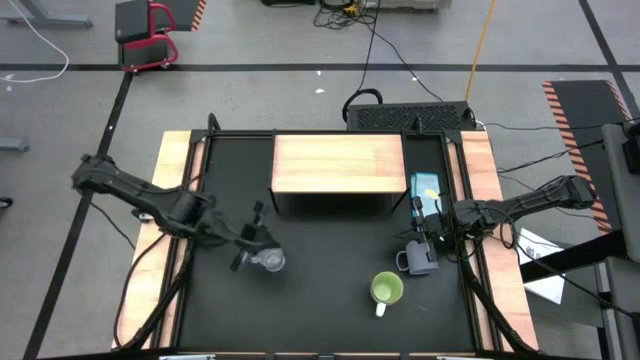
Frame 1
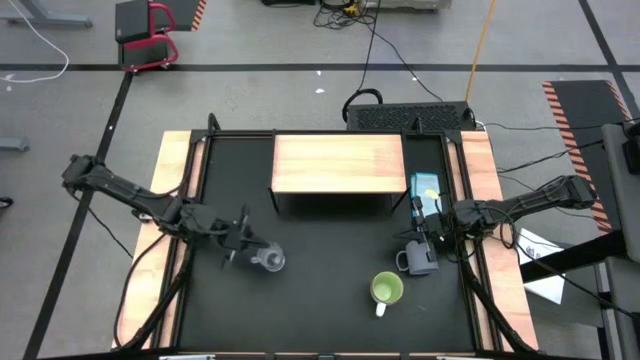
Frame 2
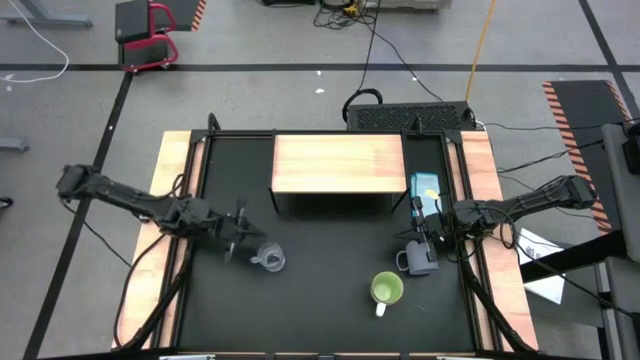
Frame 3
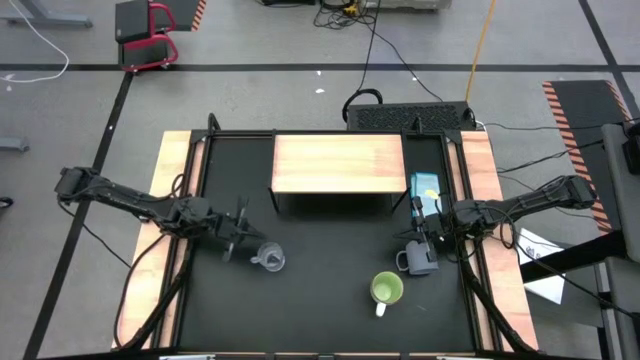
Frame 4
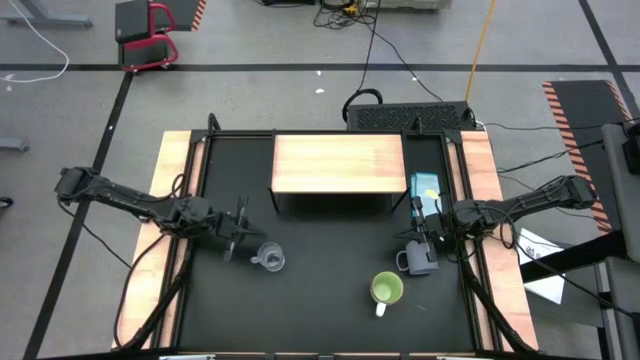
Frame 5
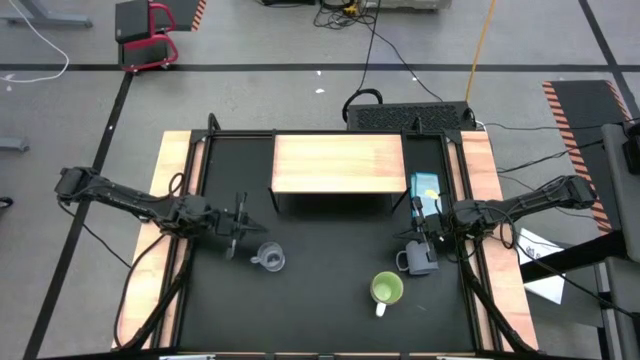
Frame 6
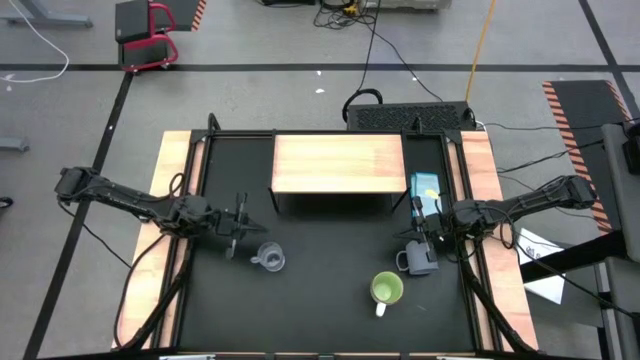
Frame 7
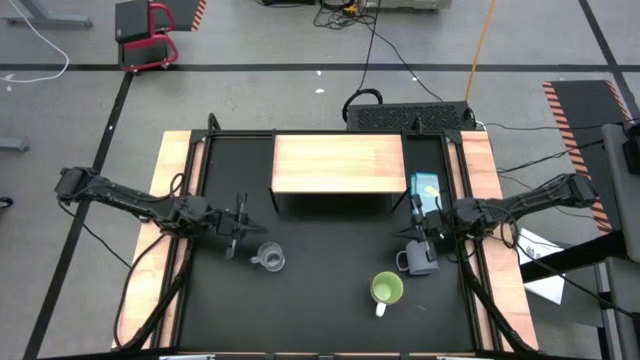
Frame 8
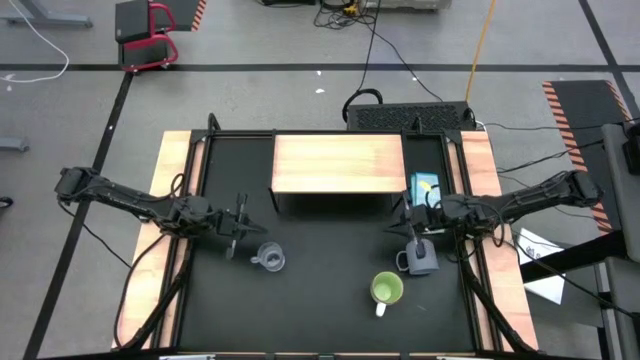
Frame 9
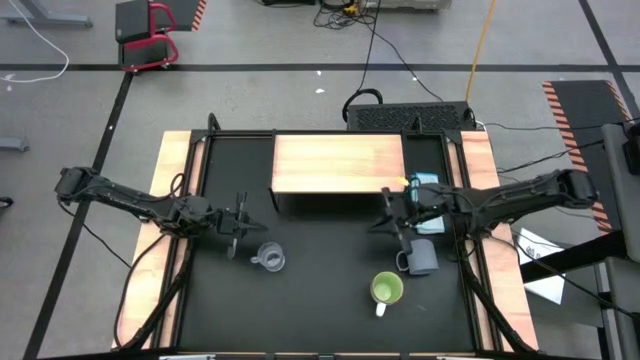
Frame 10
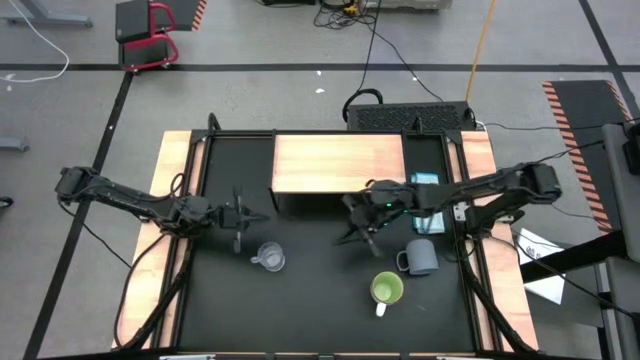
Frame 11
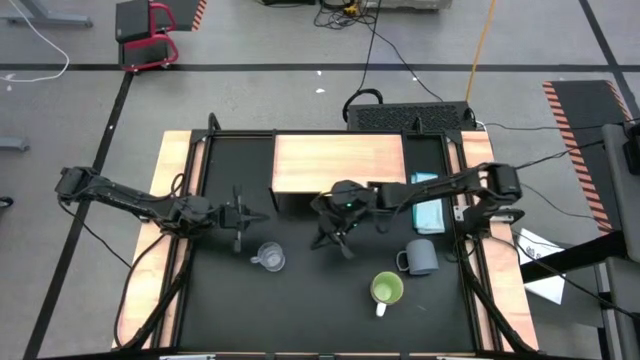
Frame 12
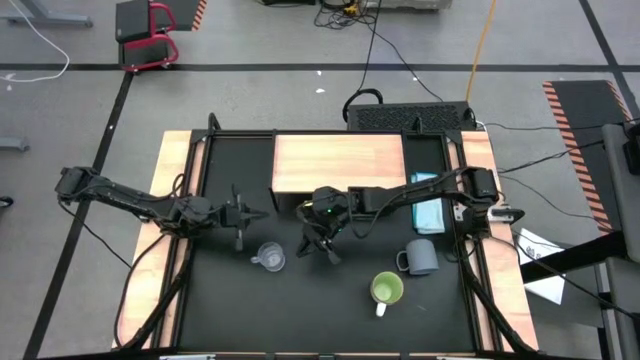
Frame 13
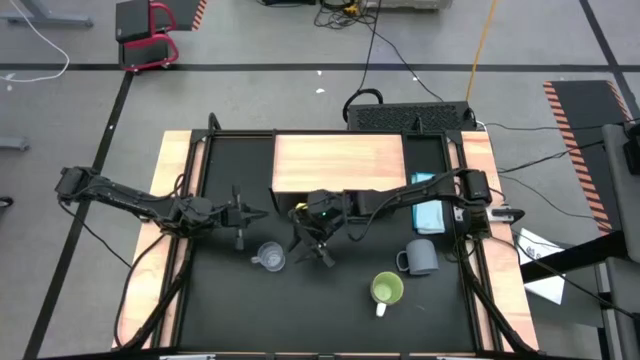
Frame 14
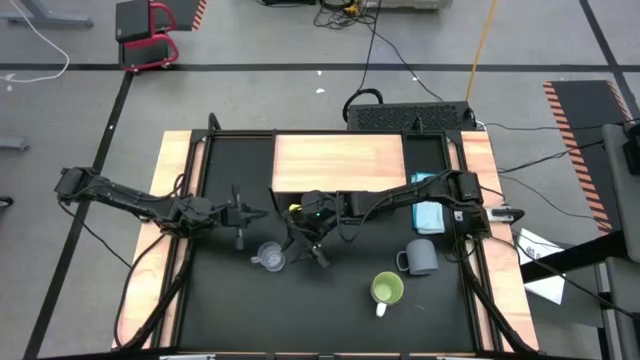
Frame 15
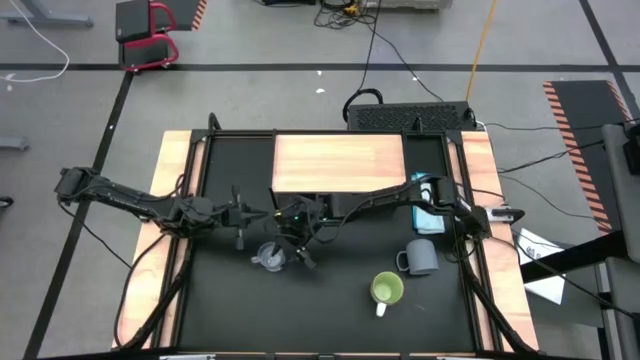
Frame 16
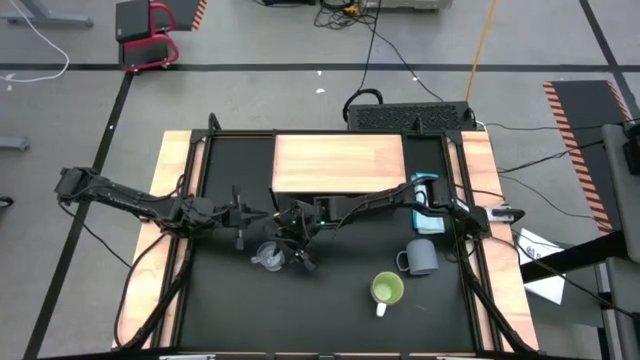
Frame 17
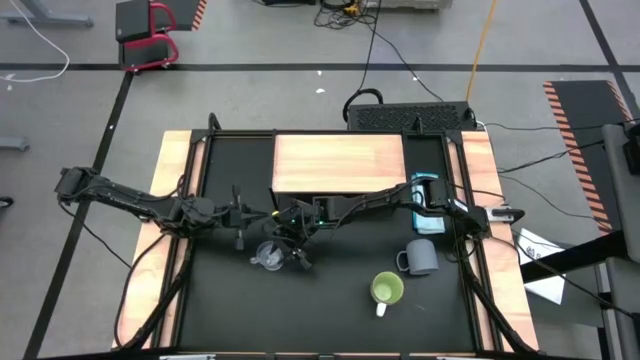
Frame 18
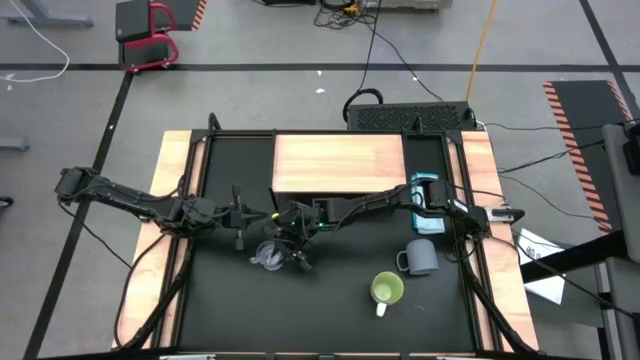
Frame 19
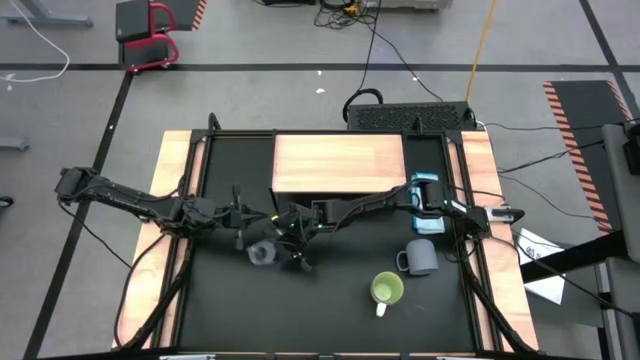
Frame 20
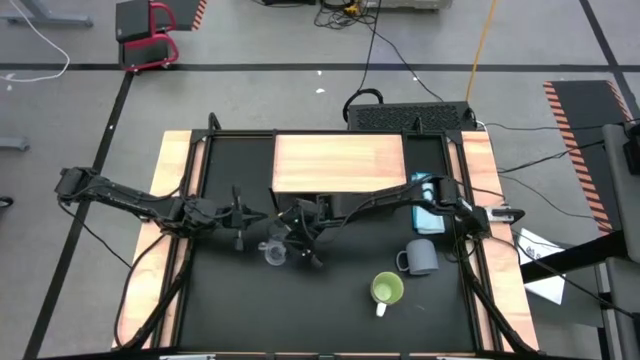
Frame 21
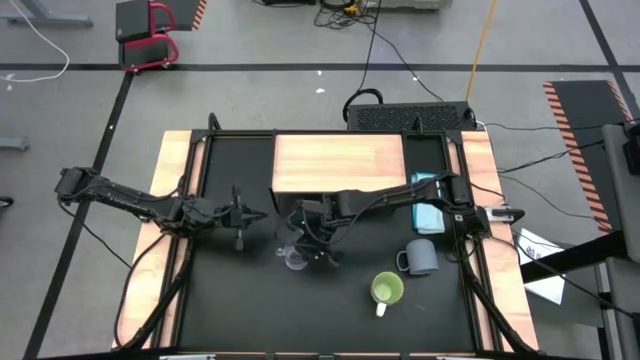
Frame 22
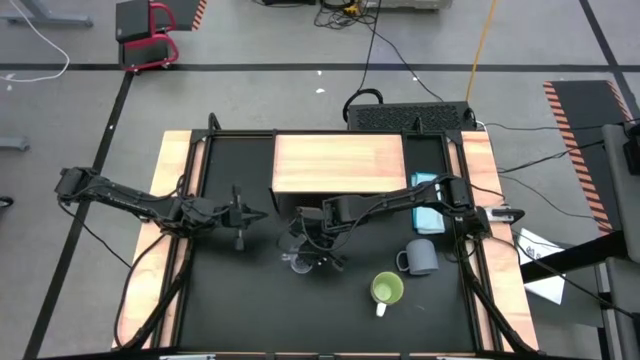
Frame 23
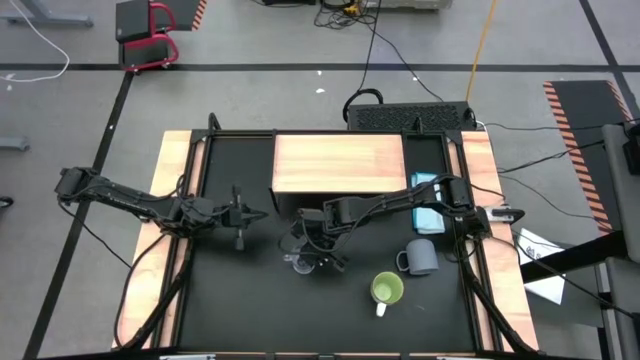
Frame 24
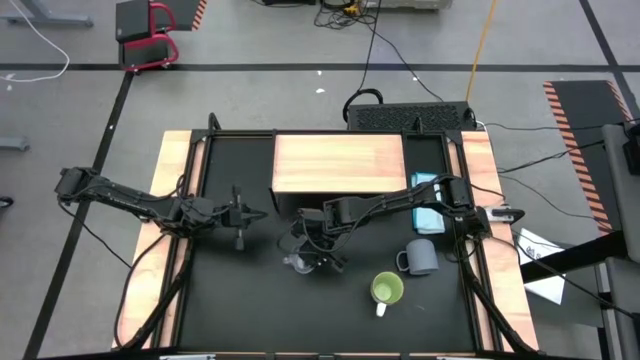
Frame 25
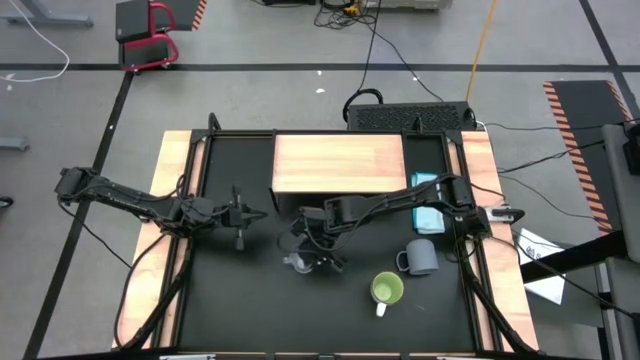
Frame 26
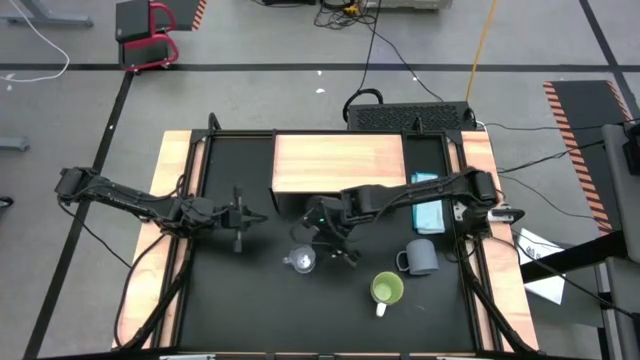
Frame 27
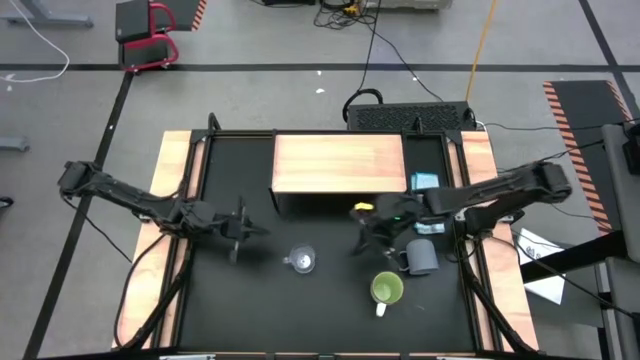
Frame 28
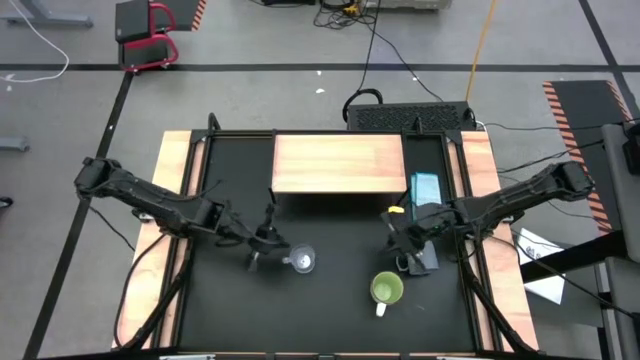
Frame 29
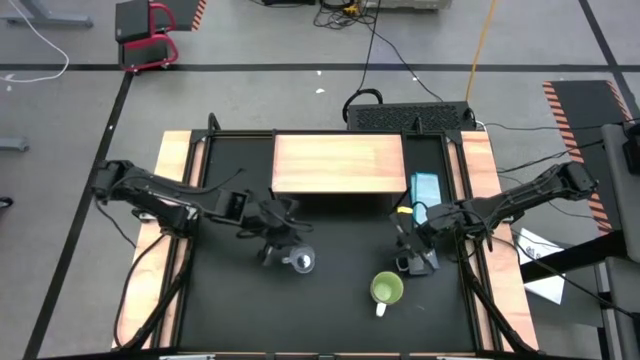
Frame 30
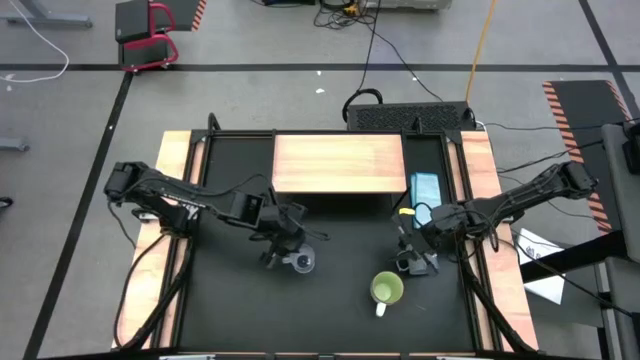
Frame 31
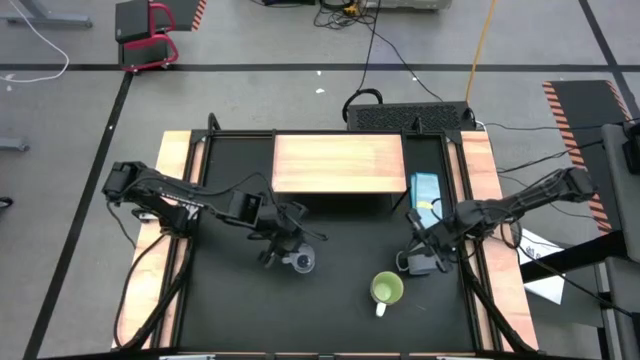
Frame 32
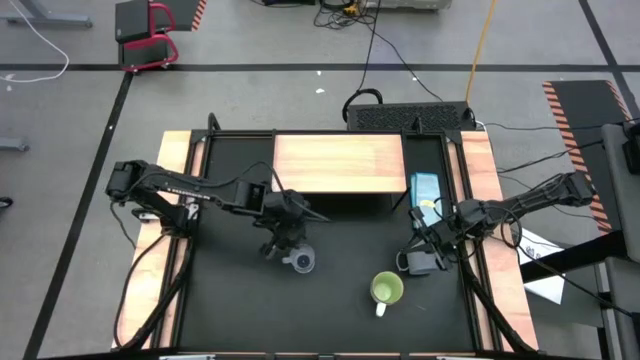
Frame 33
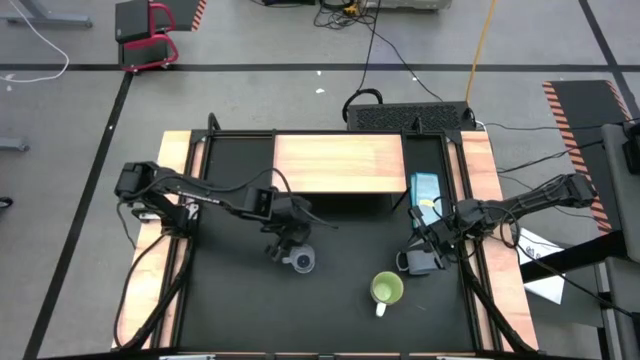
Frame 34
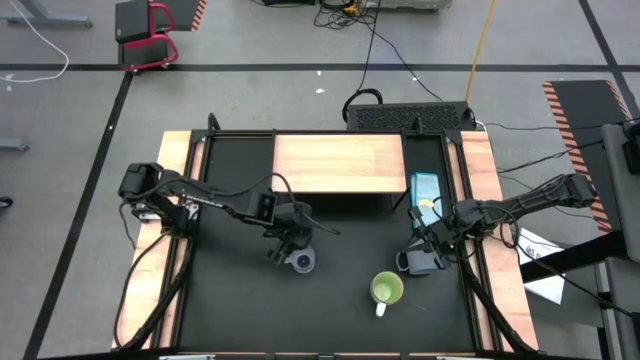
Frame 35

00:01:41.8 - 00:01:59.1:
Task: Stack small to large cups/mugs on shelf
Put the transparent mug on the shelf

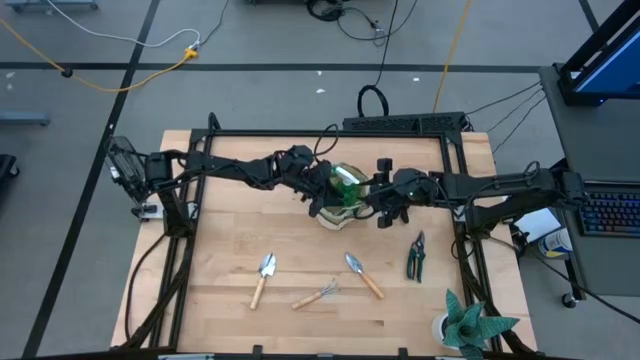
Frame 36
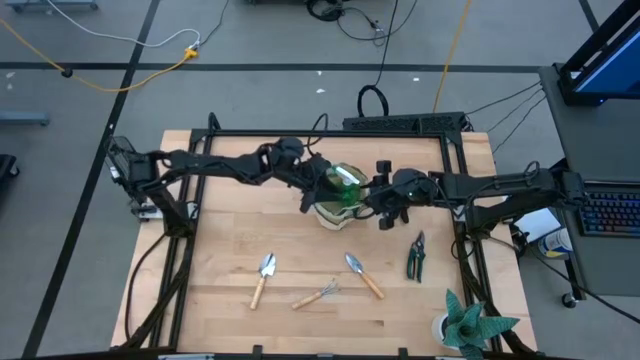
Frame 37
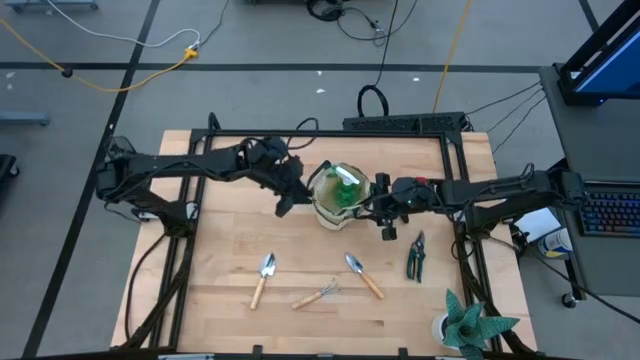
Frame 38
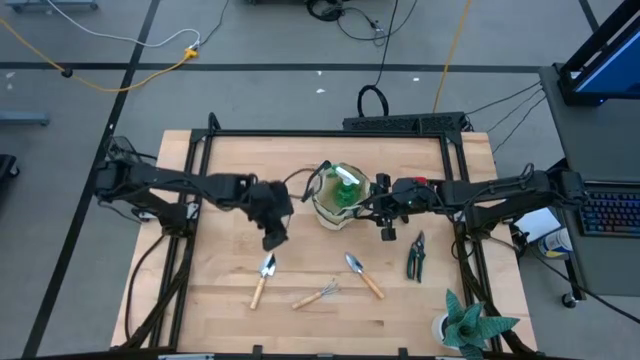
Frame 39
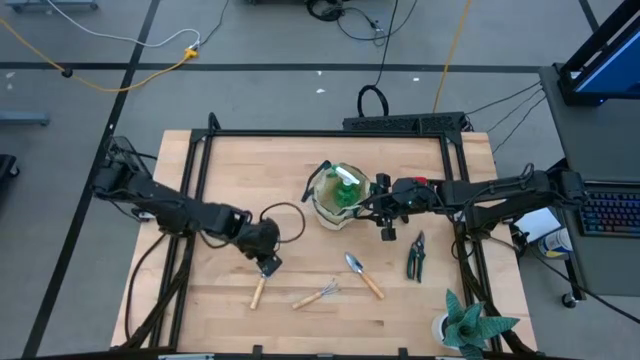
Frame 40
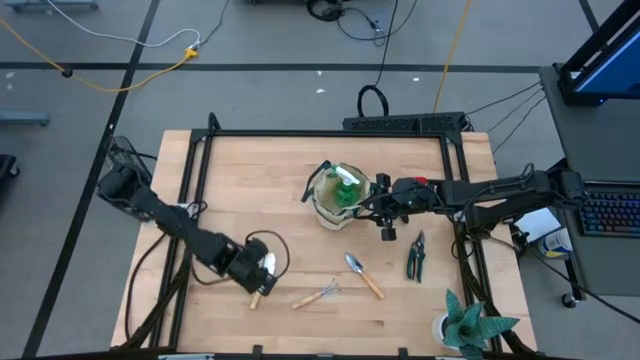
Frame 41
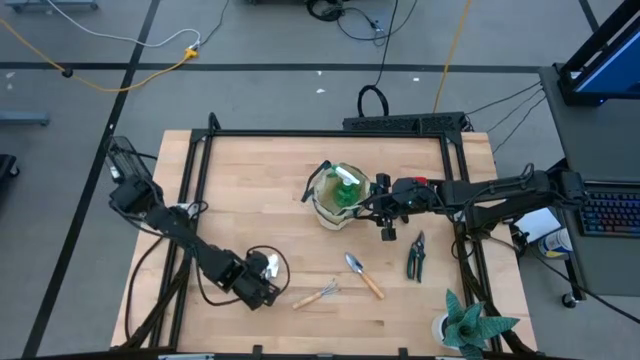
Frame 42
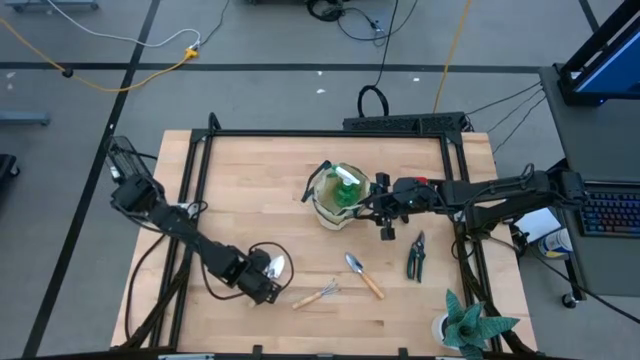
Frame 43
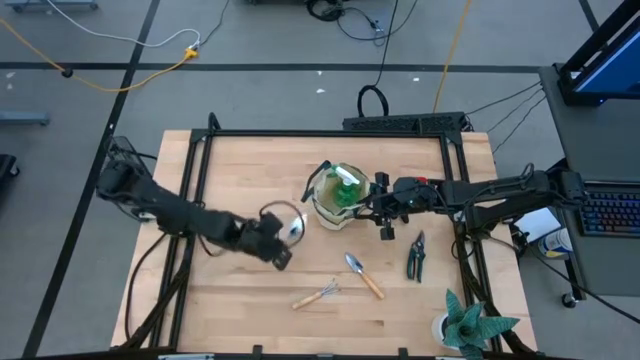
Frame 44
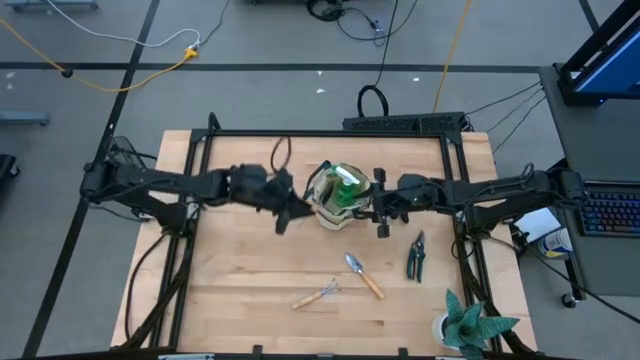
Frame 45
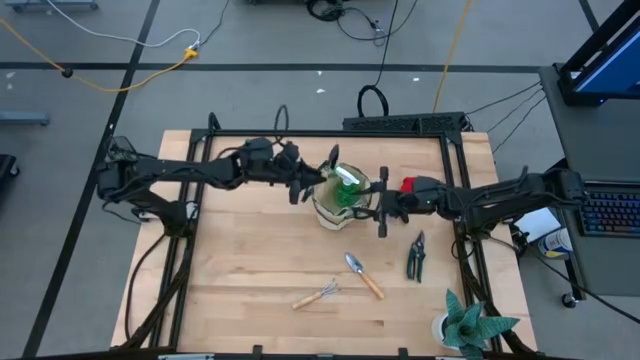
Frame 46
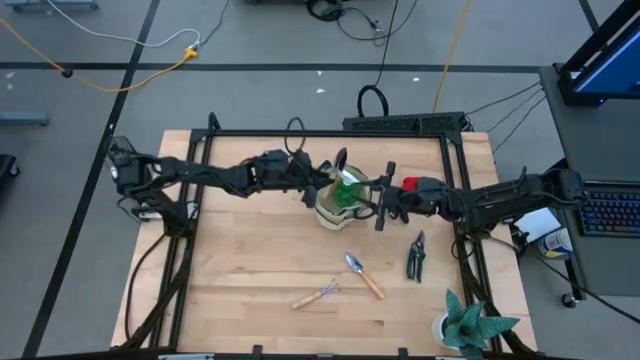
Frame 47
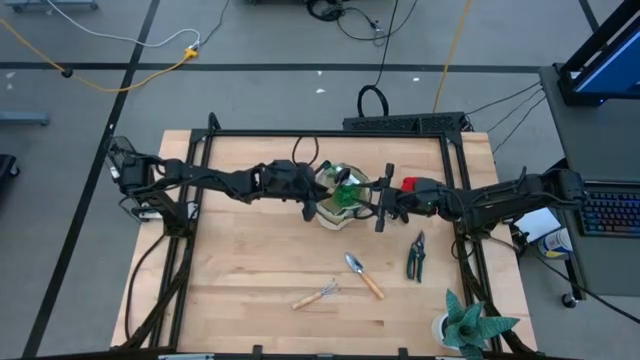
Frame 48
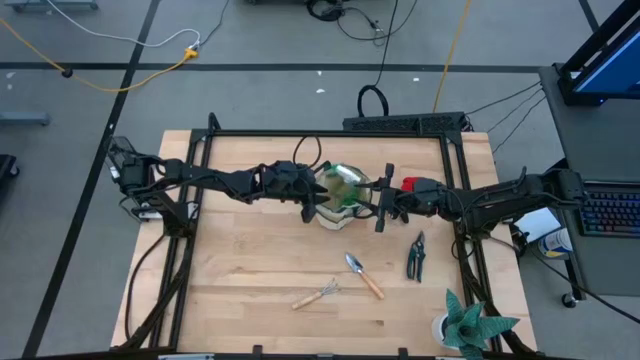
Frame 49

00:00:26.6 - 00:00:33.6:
Task: Pick & Place Garden tools in Gardening bag
Put the left brown trowel into the brown gardening bag
